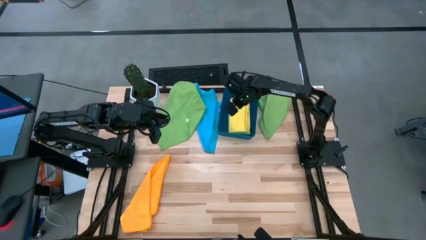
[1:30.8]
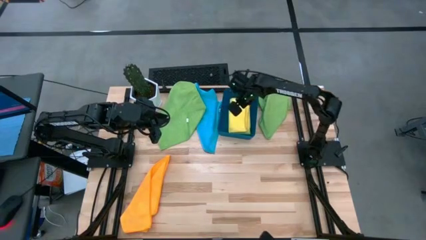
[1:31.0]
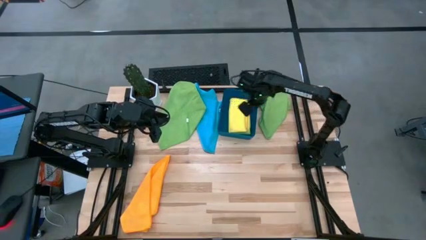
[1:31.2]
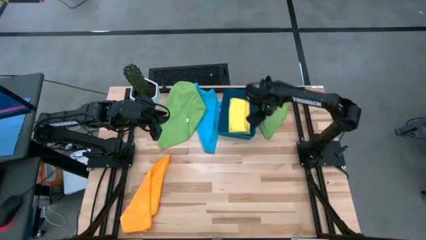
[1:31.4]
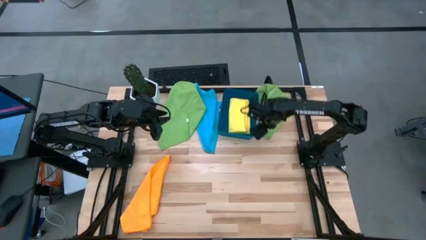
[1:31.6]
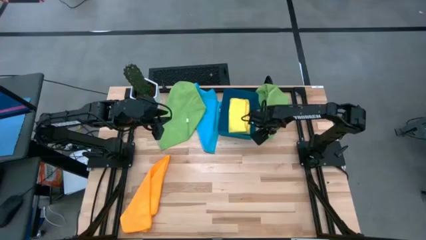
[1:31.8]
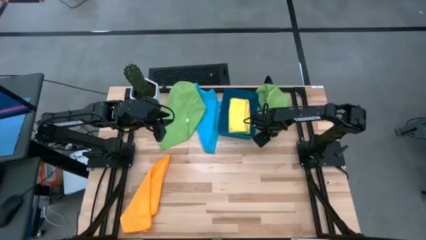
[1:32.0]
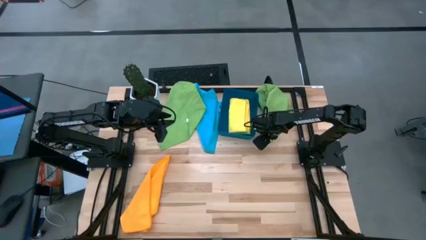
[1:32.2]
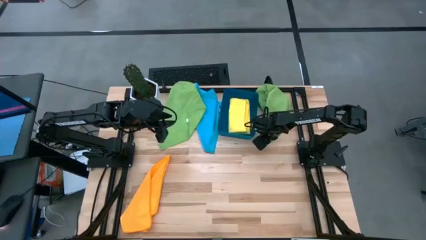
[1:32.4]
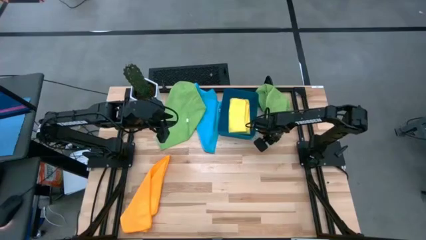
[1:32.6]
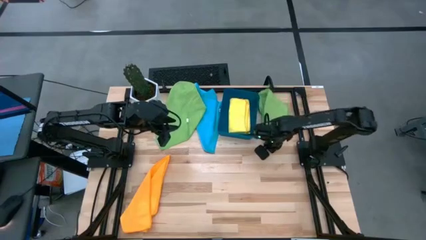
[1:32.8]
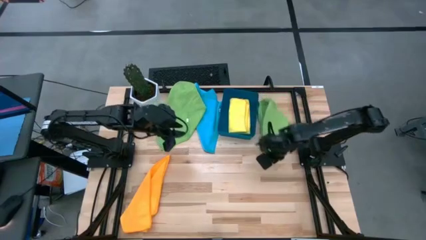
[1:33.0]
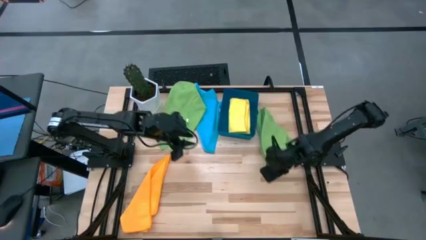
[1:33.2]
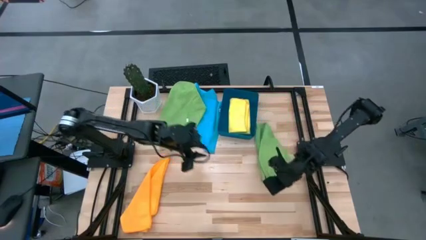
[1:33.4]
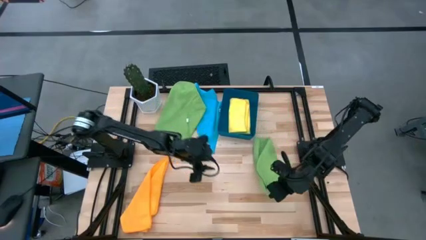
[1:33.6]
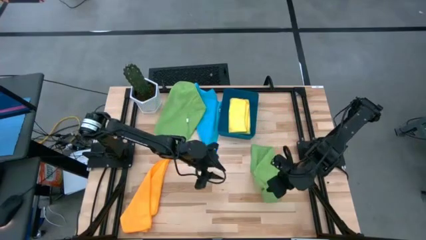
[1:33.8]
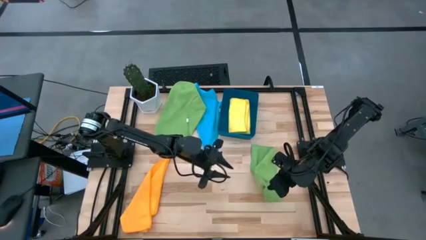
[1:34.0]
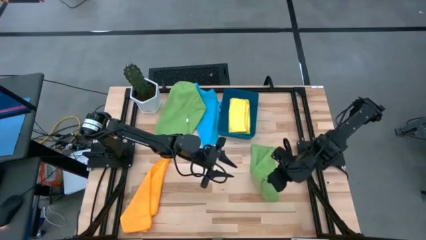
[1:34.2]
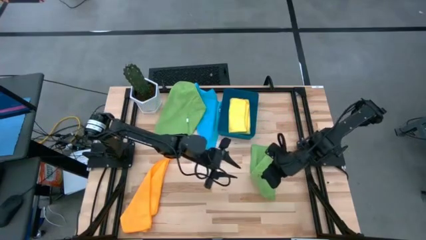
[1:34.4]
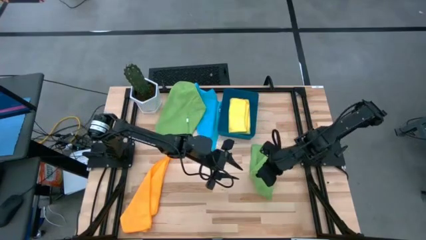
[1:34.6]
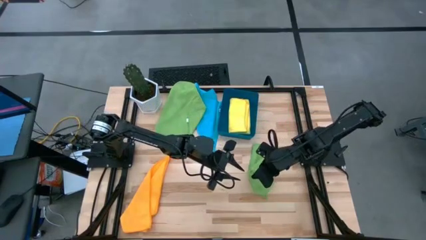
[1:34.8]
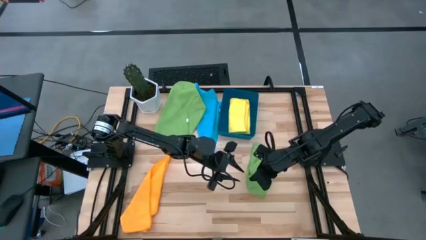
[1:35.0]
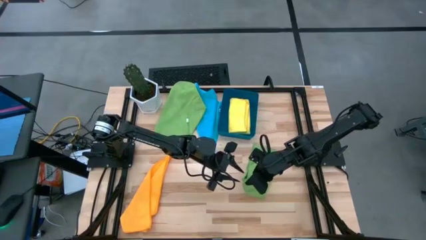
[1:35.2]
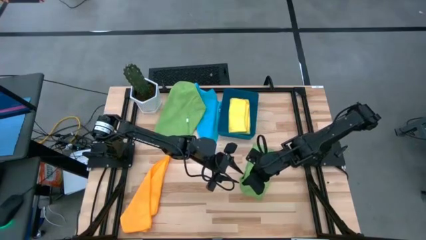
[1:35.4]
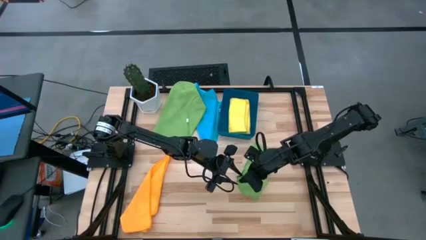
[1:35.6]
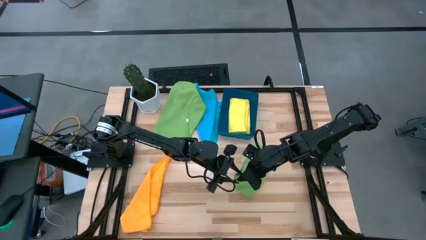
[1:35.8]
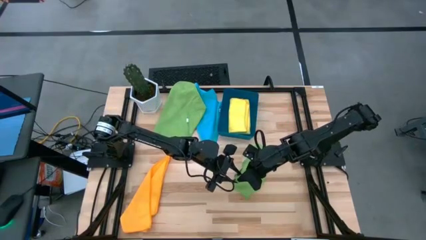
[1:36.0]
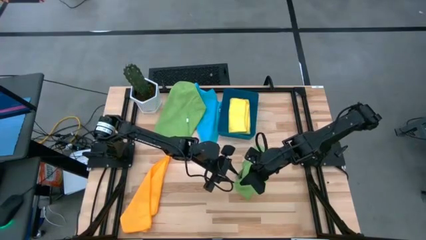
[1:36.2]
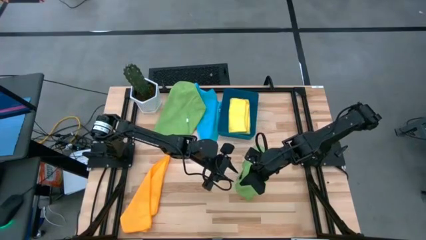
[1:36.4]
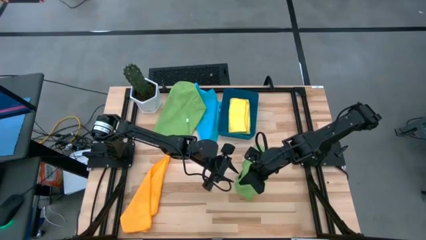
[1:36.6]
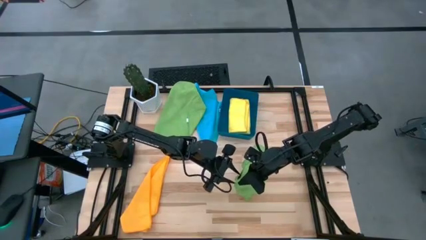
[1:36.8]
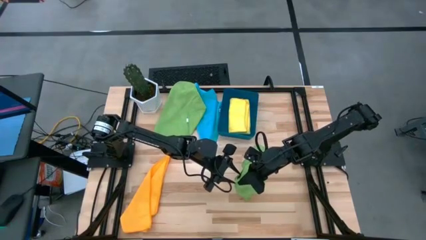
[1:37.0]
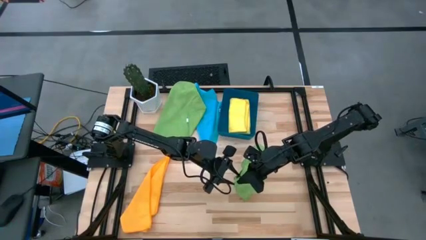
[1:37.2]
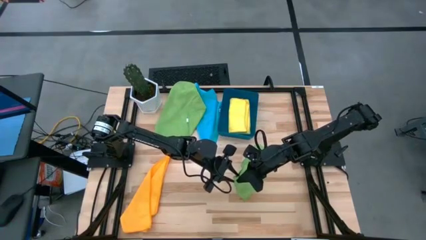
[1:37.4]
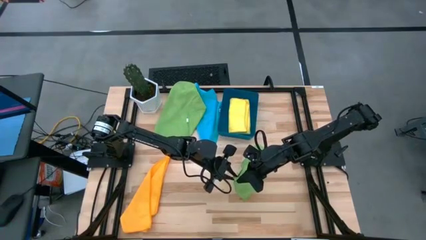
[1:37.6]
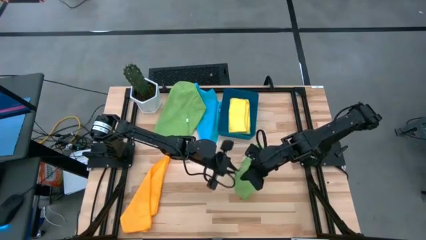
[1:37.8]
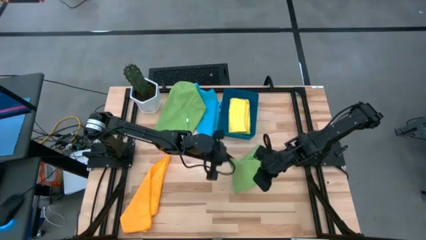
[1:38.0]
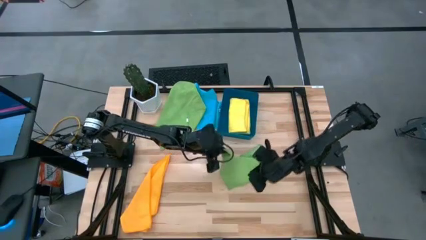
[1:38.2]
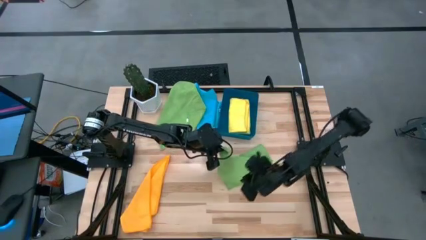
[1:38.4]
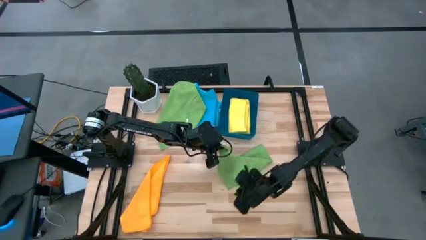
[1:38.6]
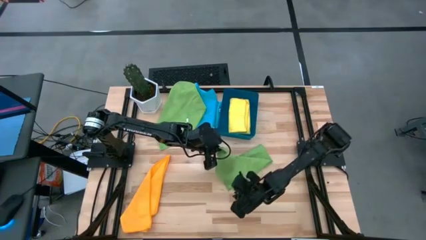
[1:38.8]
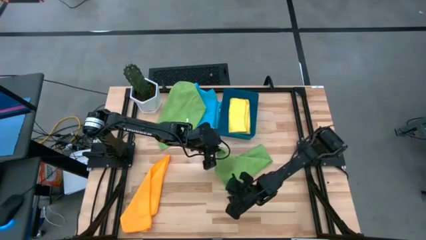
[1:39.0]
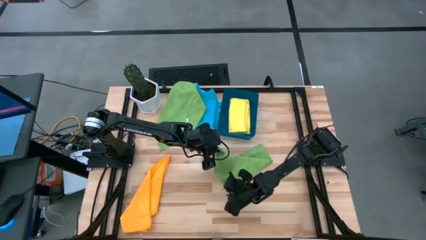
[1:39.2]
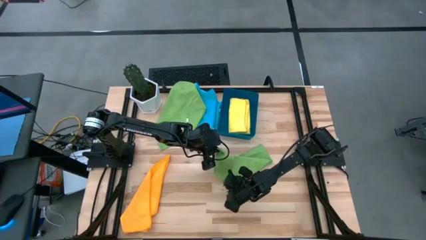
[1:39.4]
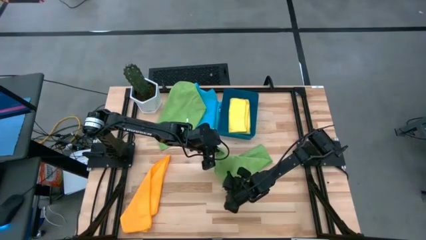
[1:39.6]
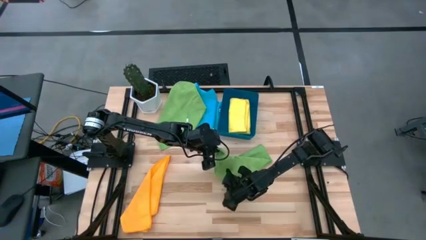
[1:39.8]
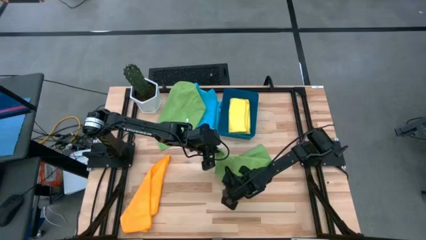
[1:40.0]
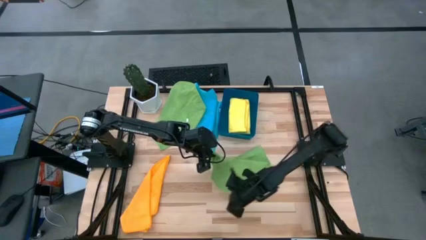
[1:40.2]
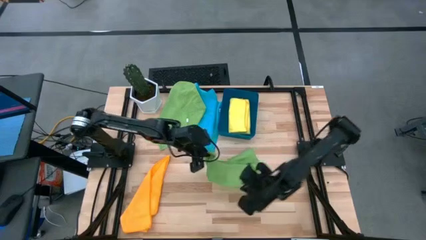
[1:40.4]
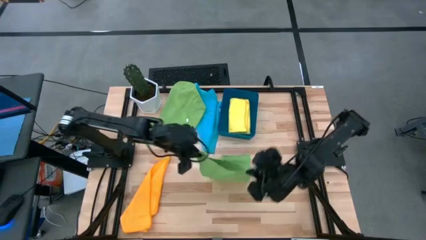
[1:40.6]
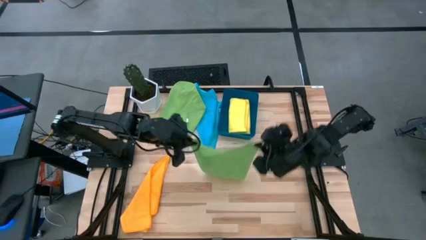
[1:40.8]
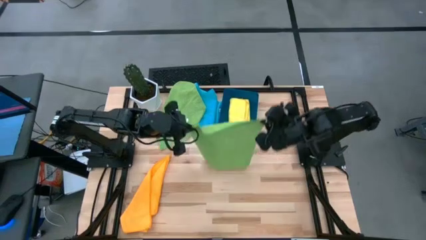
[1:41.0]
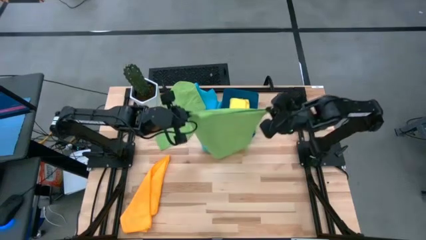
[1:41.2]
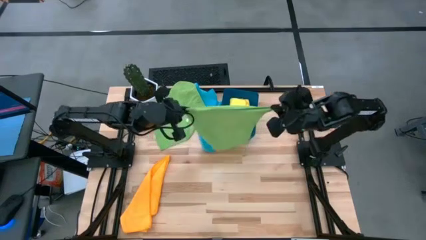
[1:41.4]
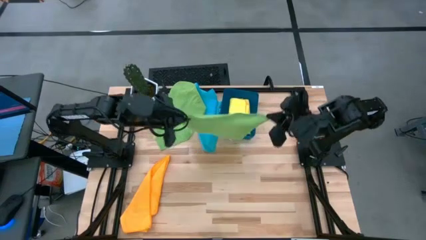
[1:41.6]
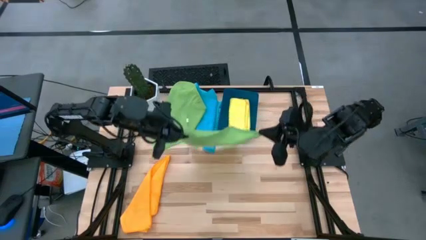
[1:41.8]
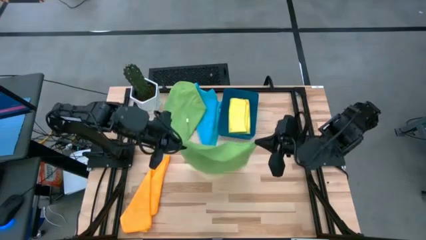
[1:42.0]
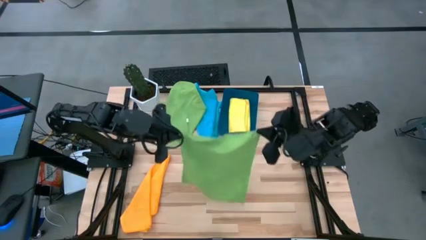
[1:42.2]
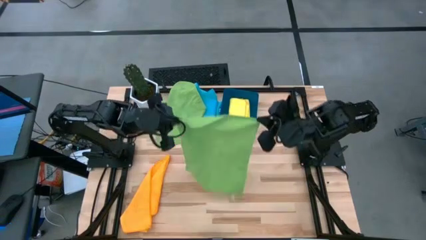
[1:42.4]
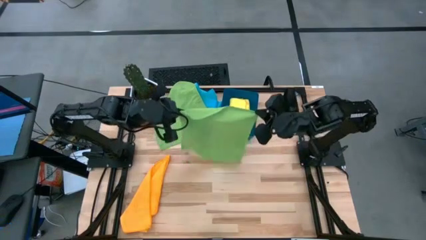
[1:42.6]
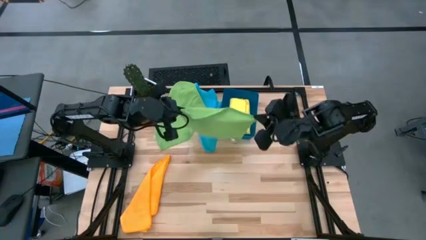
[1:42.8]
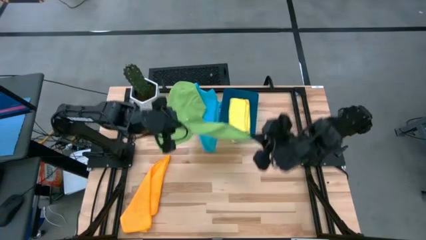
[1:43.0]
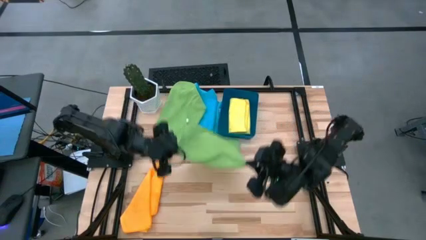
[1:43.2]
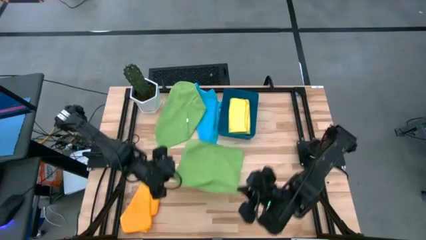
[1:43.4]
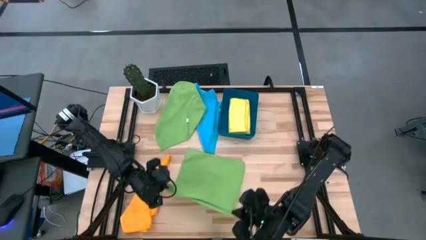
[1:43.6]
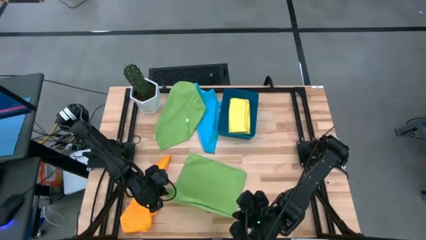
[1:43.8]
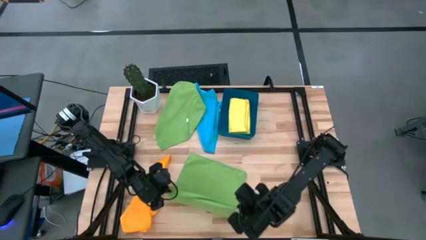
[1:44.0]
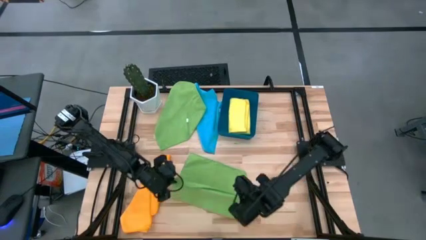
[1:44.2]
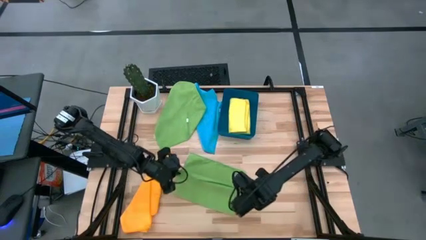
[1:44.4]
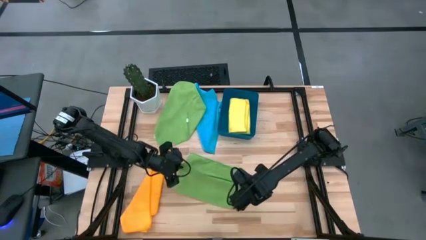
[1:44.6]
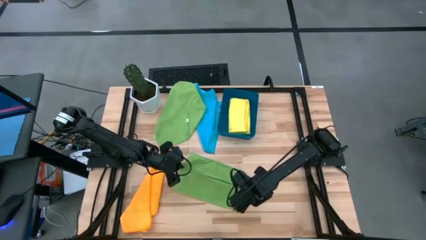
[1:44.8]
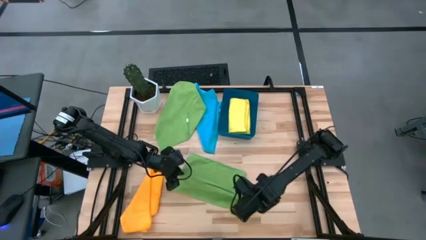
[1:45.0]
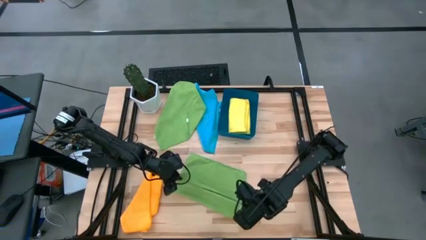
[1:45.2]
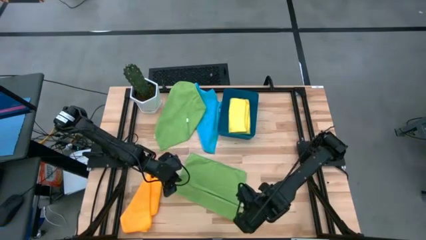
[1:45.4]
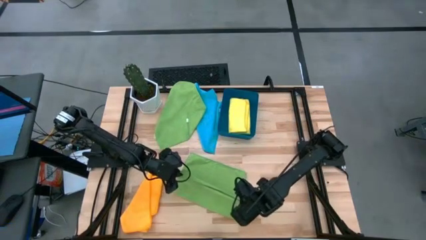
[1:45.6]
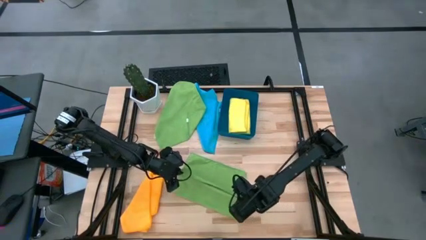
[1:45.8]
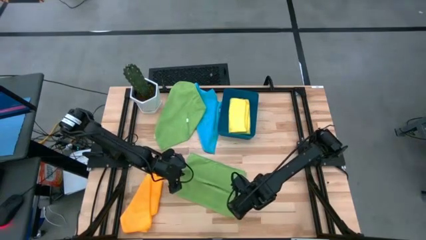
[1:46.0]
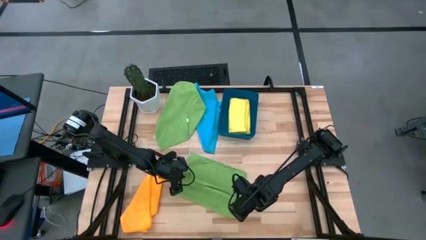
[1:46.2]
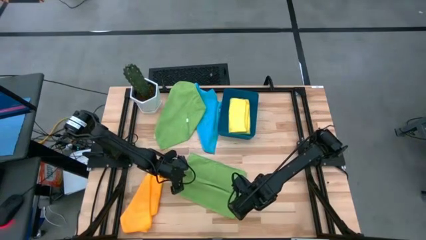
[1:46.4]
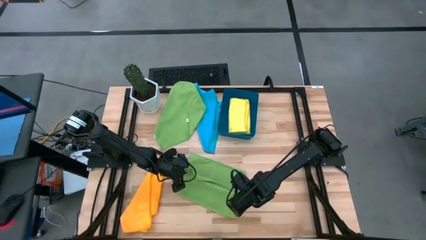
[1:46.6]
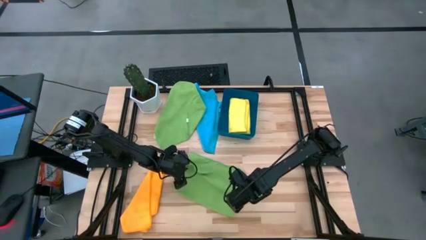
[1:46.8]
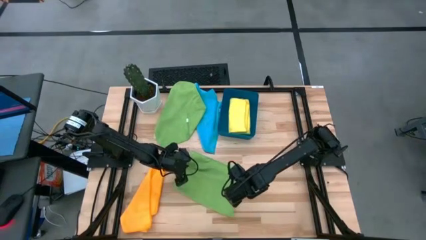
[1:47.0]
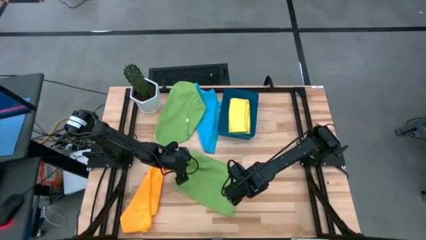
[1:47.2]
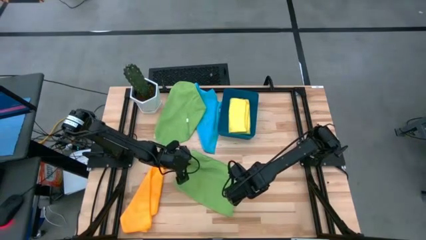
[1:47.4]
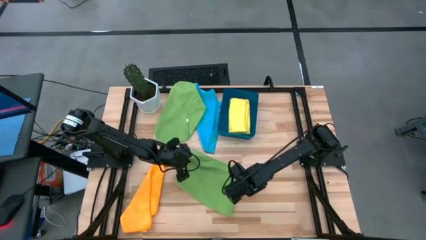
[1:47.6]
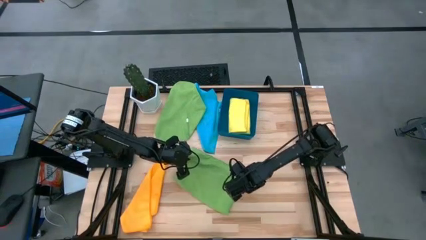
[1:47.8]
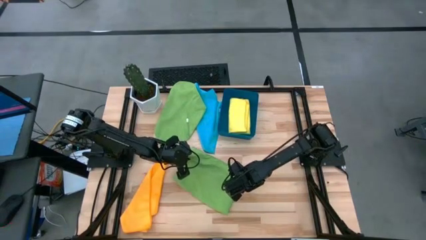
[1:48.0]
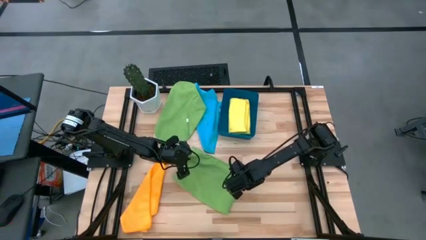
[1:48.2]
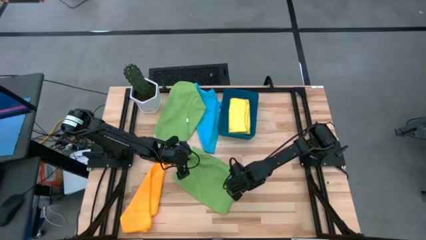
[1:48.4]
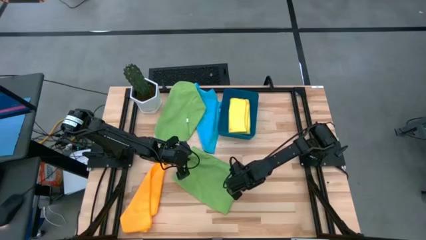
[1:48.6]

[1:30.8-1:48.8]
Task: Fold microfiber towels
Fold the right green towel
